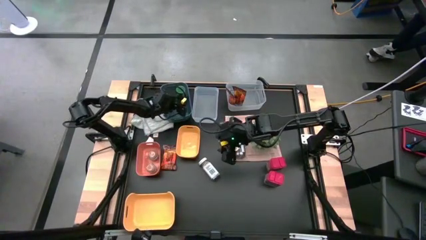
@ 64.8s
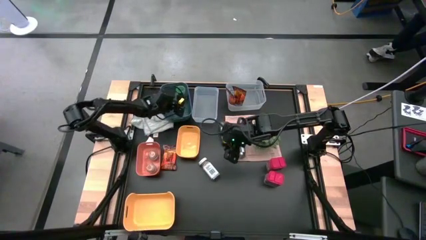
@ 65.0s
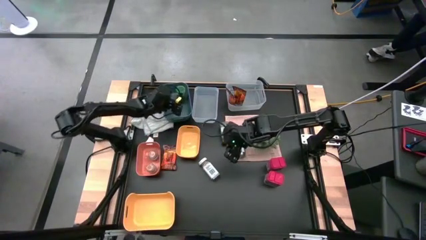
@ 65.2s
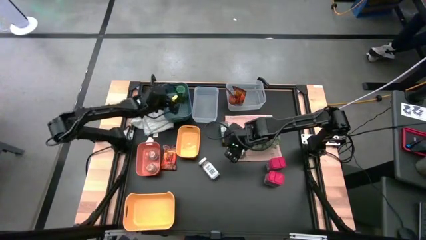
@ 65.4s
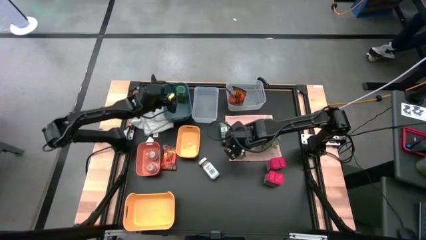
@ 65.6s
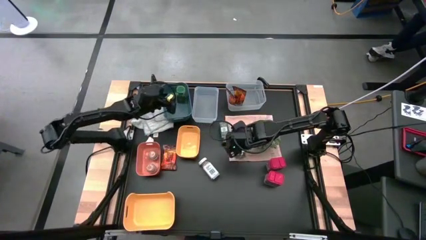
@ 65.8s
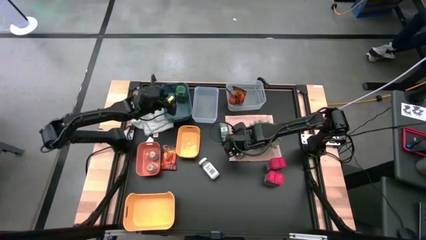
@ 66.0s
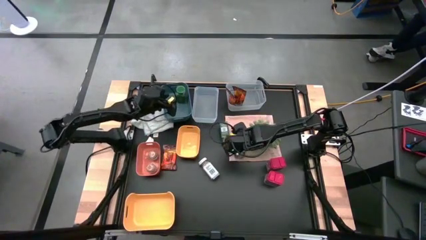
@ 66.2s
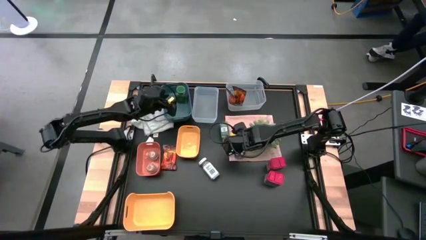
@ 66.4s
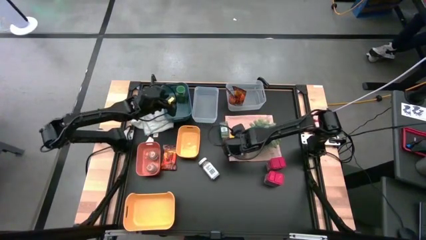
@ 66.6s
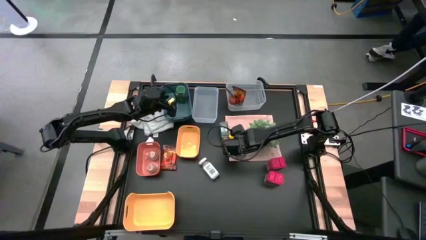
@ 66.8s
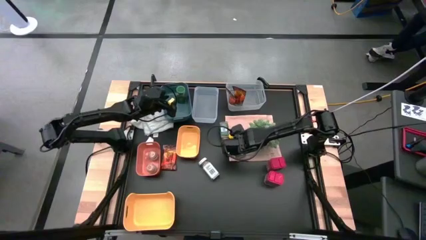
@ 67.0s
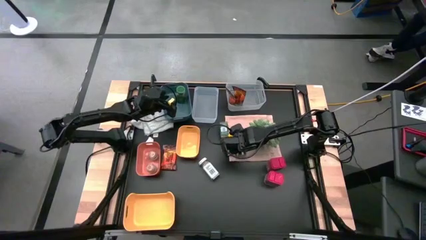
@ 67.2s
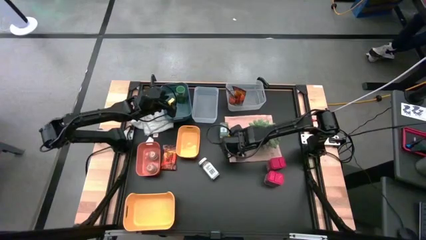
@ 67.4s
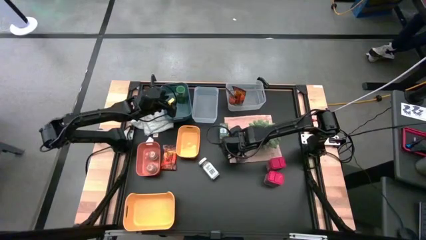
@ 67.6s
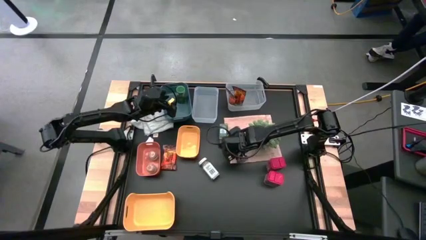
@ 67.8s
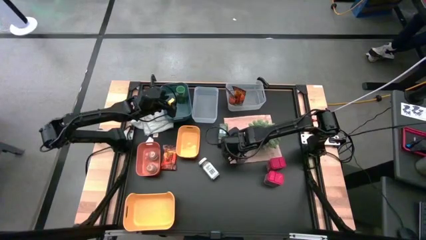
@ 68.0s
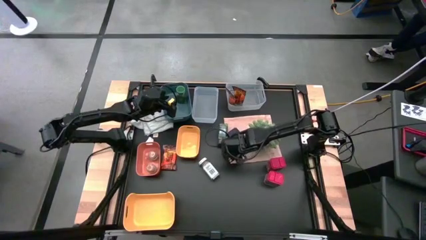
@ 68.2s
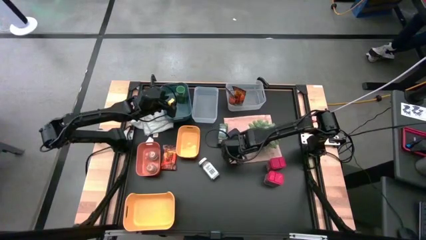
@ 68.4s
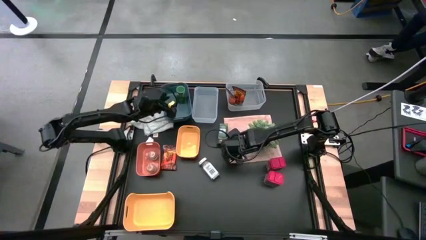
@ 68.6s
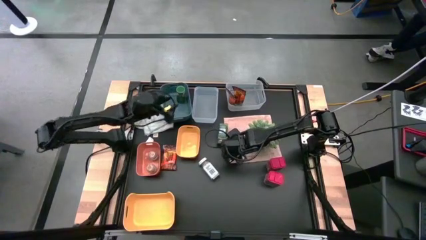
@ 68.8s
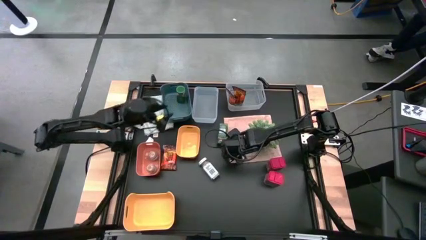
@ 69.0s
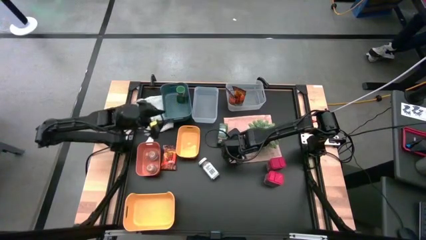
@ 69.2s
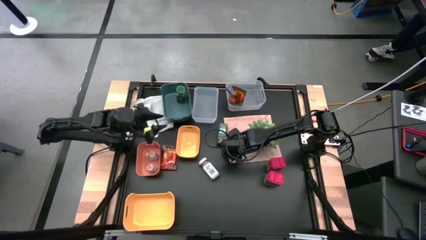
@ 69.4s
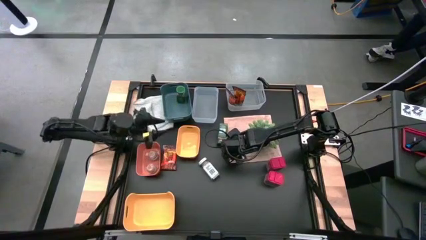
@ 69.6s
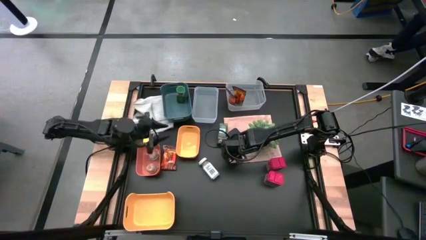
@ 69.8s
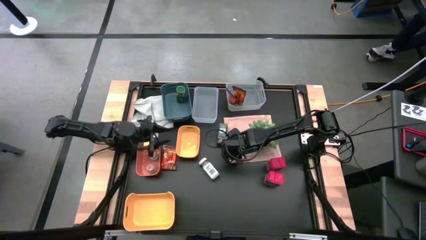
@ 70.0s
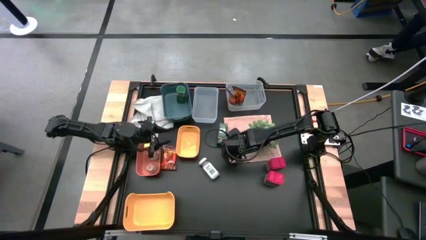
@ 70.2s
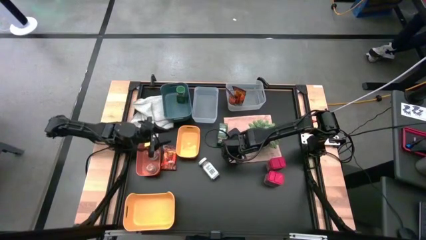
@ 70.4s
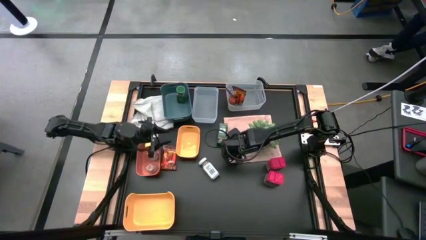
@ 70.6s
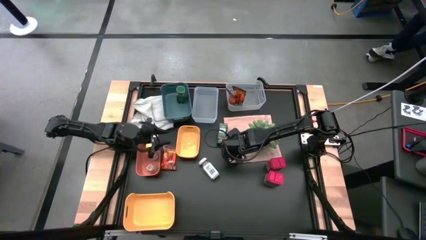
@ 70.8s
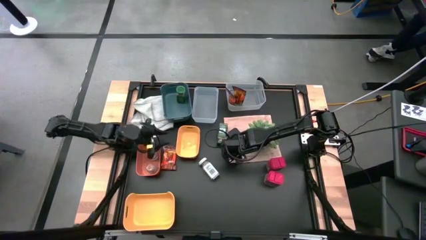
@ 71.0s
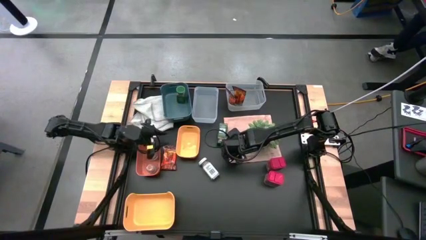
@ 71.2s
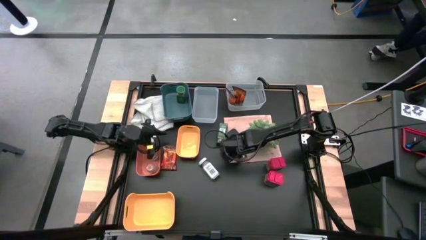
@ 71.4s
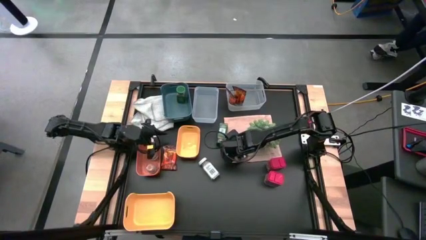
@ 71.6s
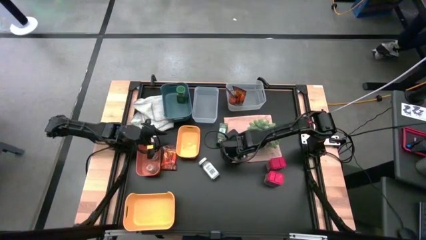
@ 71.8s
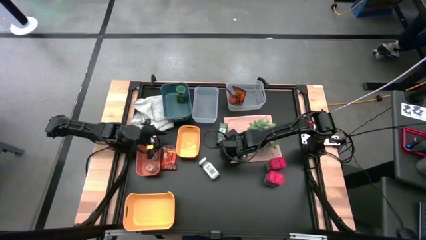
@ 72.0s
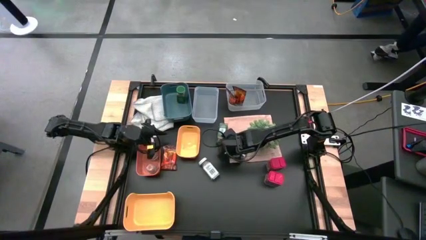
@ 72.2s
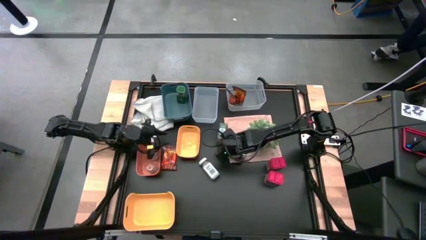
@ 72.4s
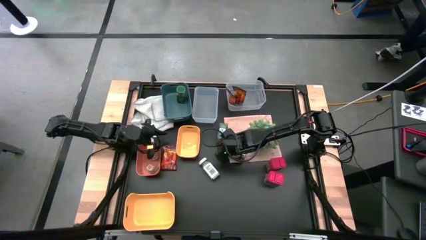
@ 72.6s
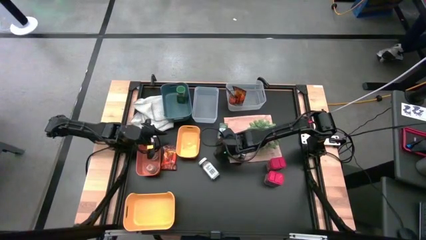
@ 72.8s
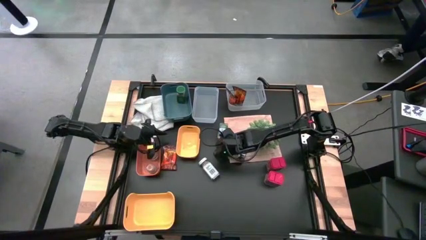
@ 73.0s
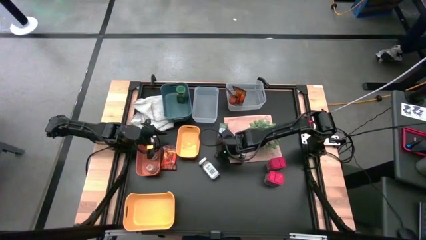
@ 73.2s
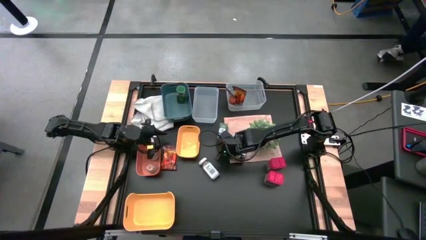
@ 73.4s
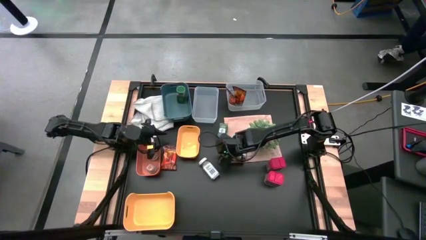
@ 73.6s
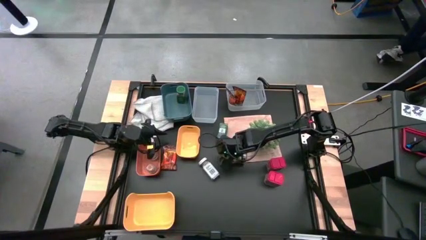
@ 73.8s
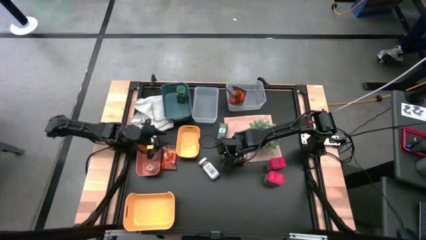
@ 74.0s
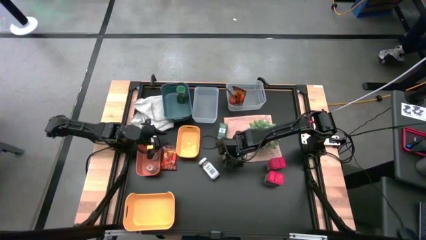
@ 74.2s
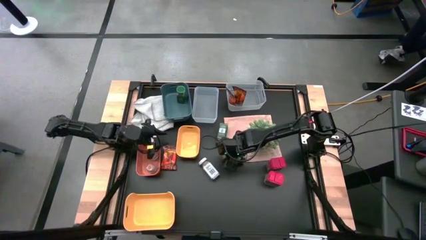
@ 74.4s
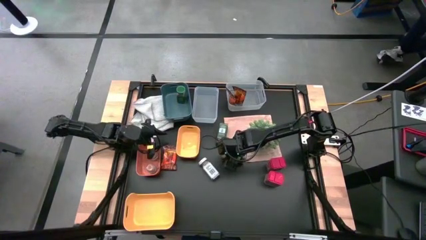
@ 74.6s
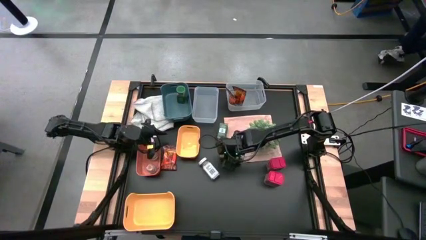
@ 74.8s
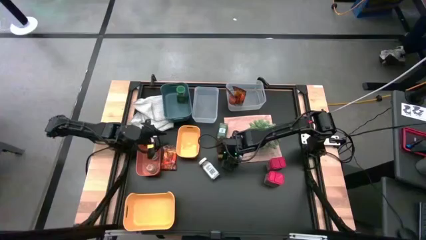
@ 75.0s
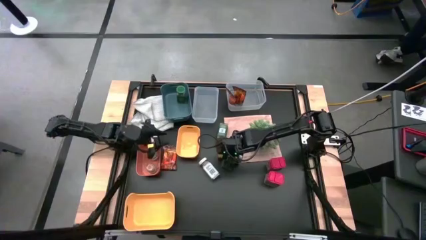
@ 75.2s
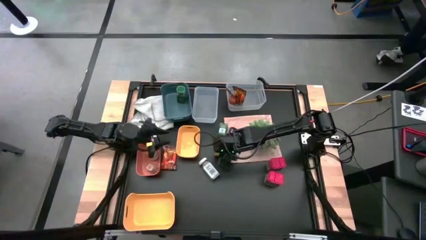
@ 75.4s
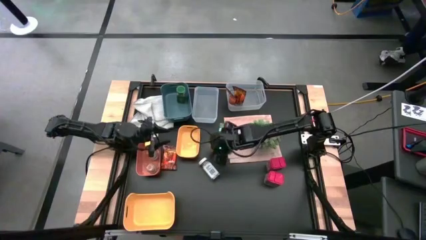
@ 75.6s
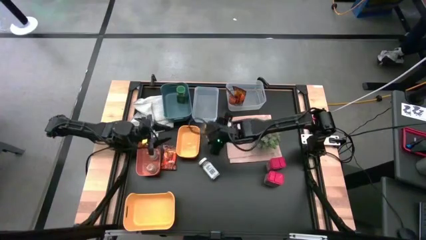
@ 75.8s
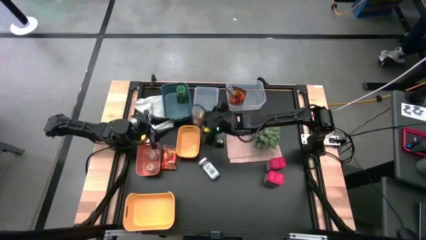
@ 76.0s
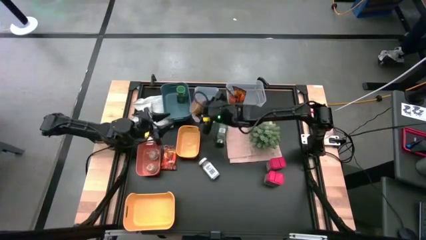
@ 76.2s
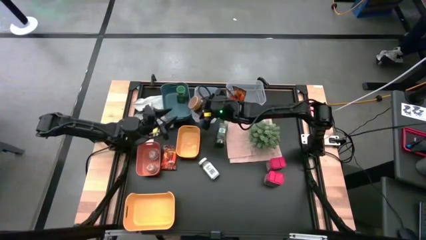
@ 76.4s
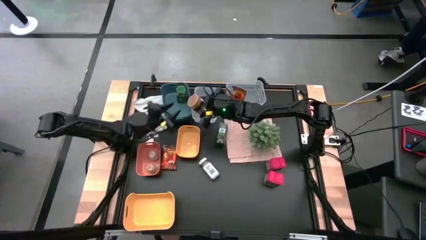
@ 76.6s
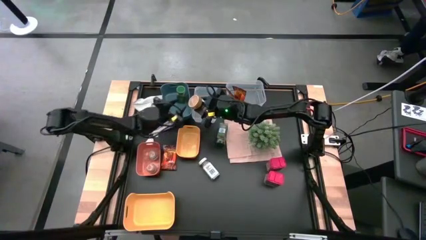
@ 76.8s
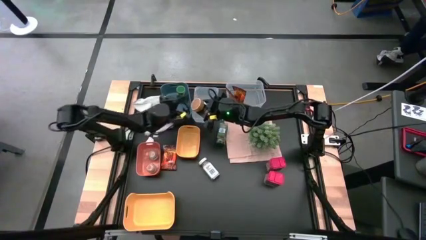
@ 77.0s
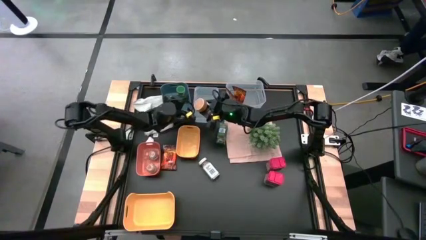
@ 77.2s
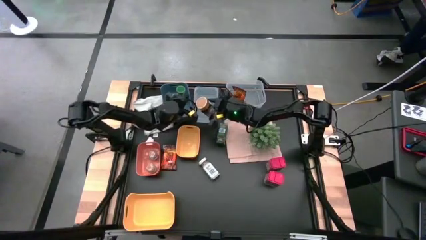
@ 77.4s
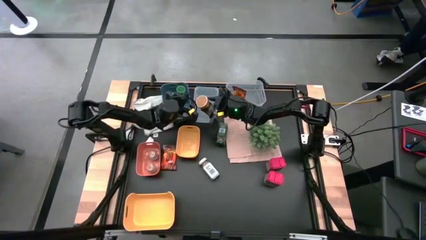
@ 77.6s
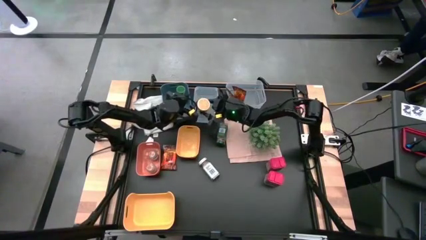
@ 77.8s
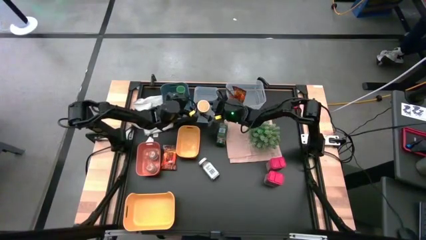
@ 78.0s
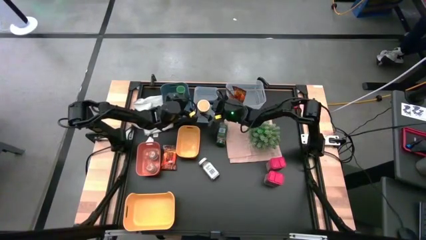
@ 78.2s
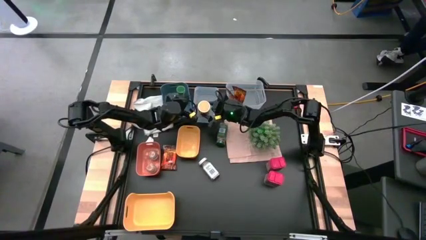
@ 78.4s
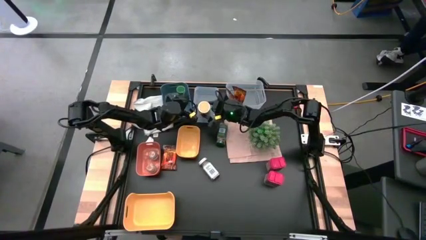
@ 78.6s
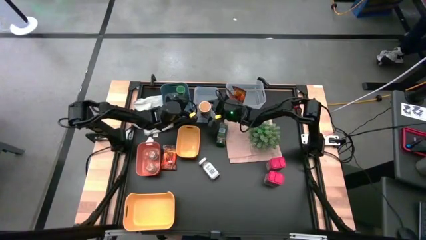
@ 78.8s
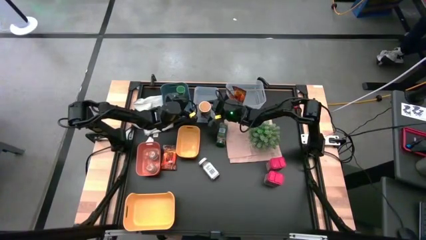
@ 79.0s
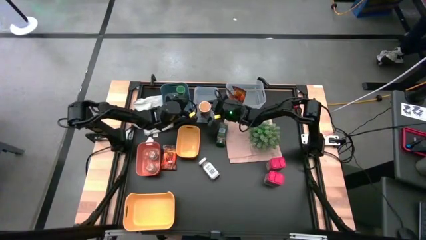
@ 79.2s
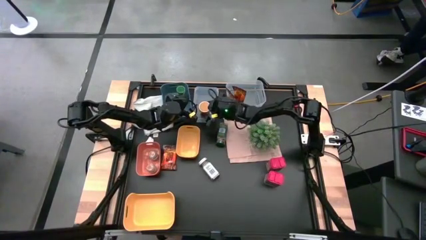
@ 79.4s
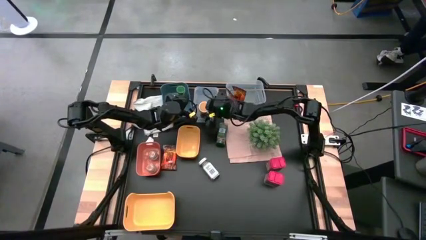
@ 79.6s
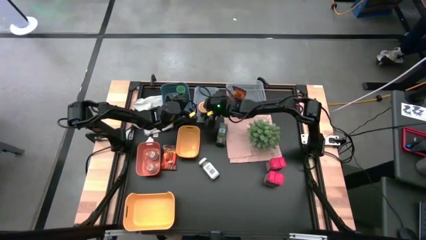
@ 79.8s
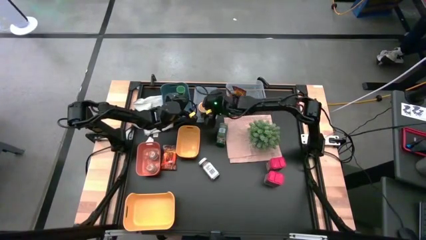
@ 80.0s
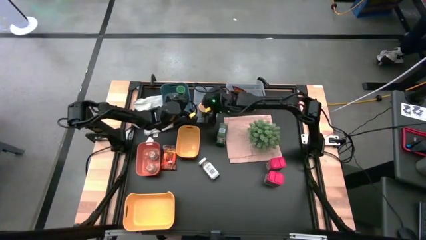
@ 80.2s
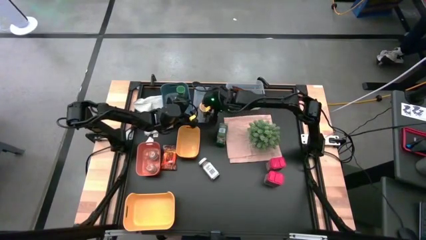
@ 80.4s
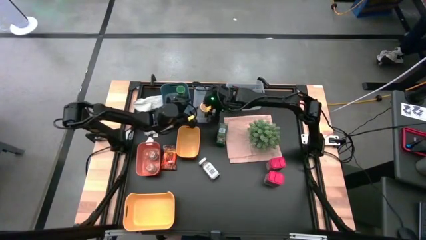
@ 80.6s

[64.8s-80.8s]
Task: Sort spices by type
Put the gold seasoning bottle into the left transparent bin

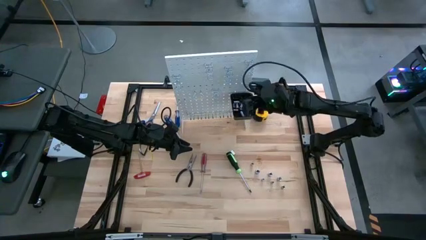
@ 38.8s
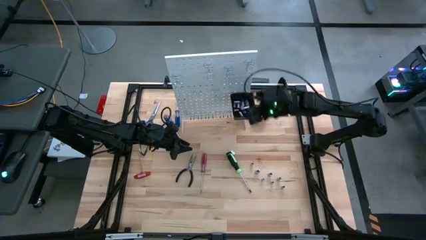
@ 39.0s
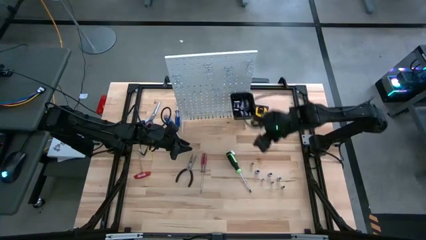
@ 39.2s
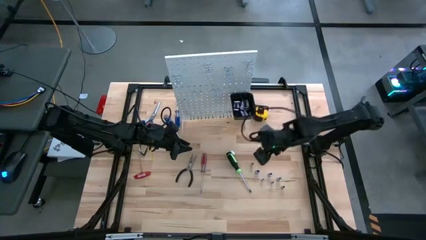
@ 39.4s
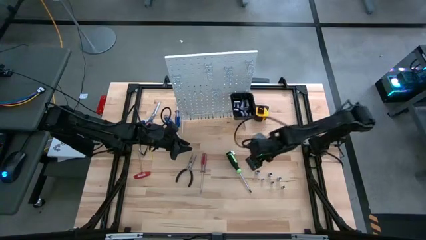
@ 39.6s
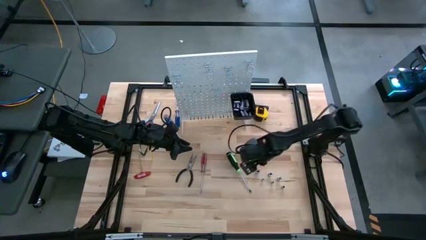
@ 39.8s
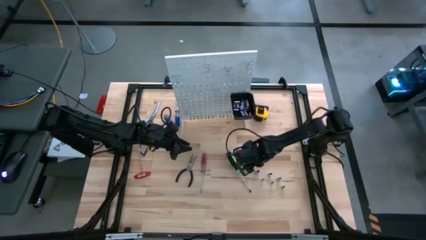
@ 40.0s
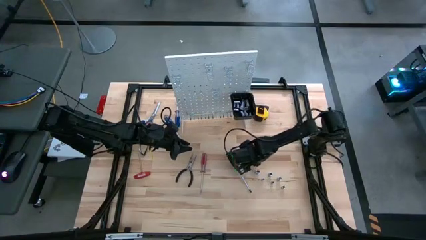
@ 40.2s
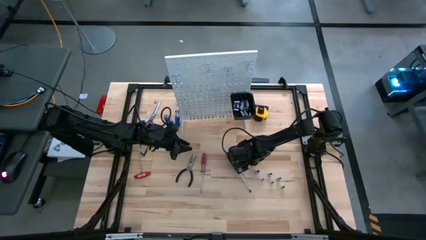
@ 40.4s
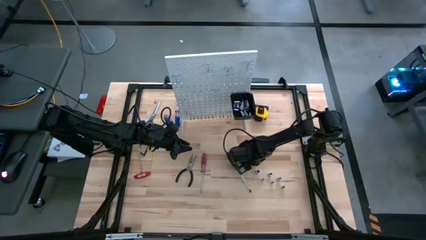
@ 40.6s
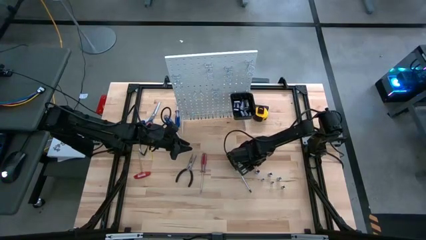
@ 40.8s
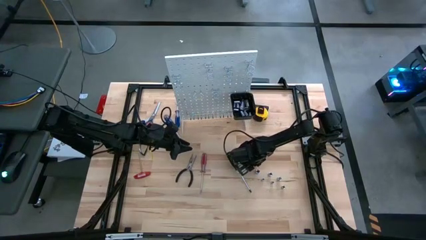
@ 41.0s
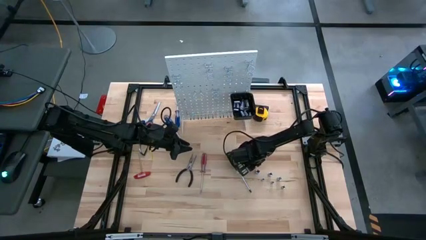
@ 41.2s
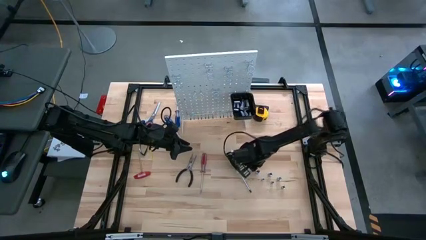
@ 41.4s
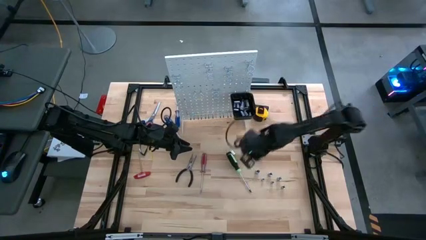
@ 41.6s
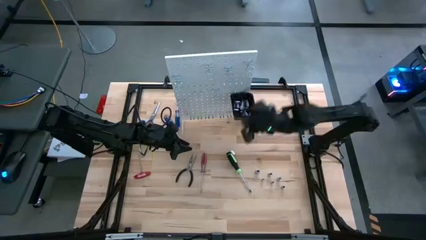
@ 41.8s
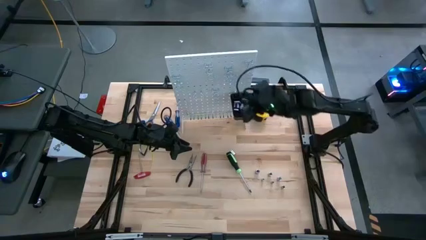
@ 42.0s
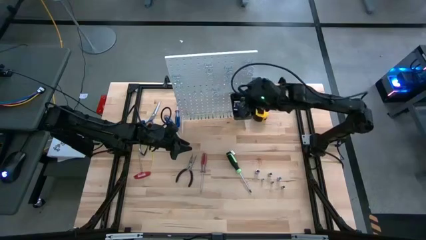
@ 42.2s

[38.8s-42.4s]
Task: Hang tools onto peg board
Put the silver socket into the black bin on the peg board
